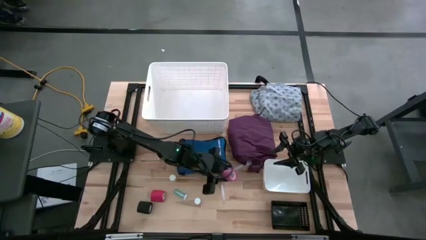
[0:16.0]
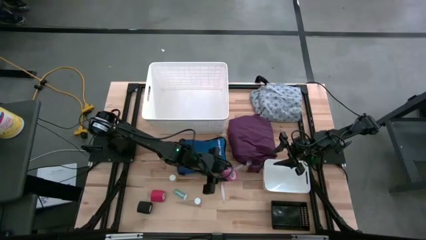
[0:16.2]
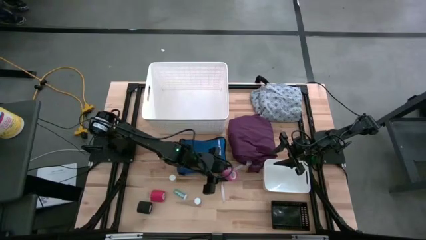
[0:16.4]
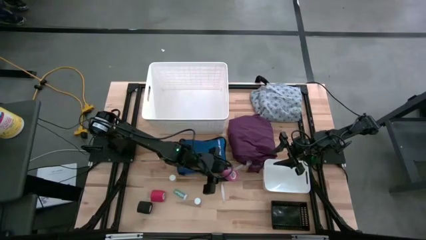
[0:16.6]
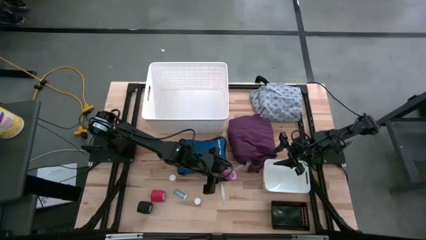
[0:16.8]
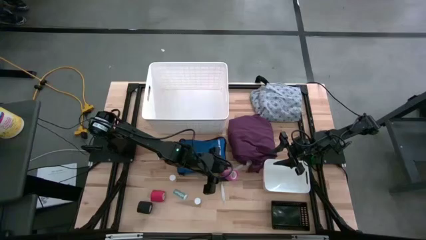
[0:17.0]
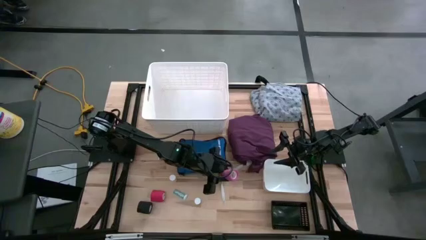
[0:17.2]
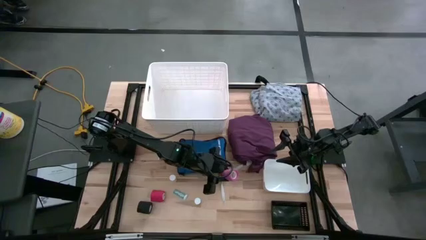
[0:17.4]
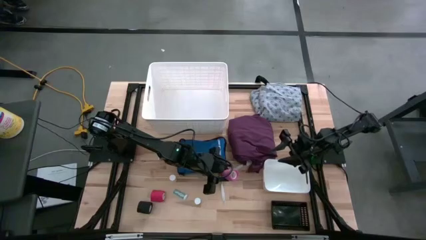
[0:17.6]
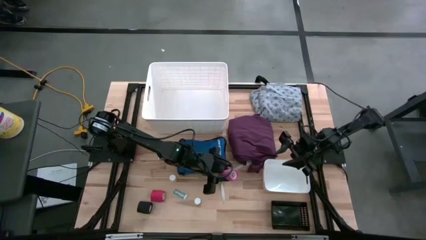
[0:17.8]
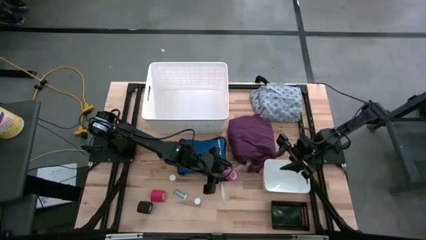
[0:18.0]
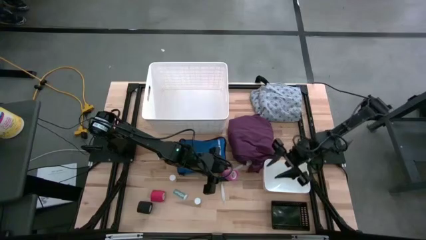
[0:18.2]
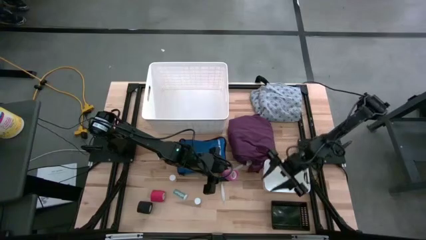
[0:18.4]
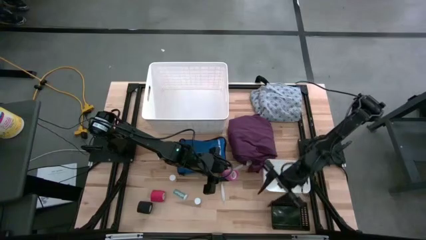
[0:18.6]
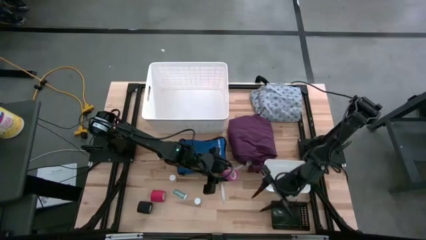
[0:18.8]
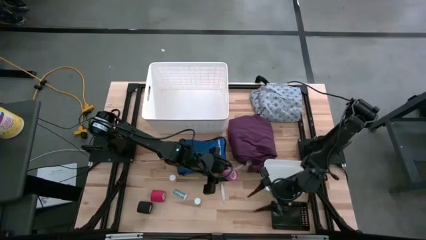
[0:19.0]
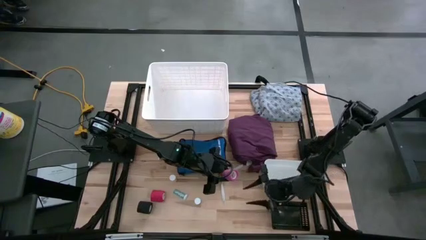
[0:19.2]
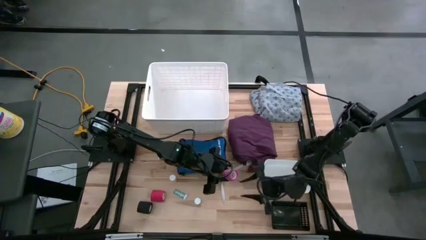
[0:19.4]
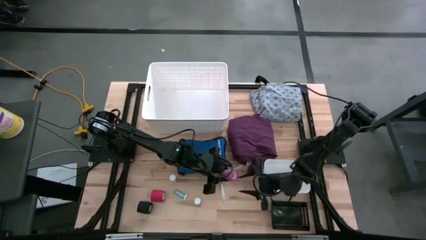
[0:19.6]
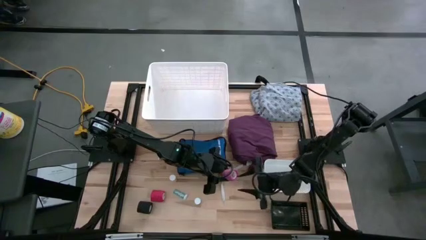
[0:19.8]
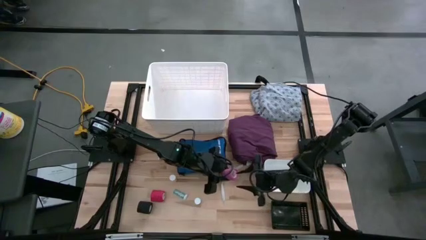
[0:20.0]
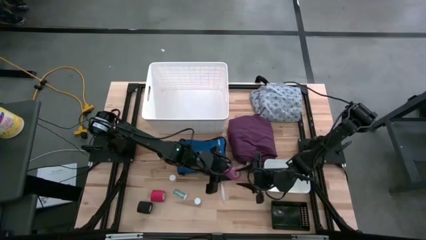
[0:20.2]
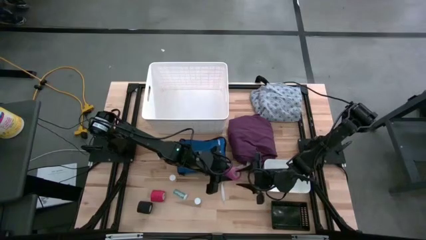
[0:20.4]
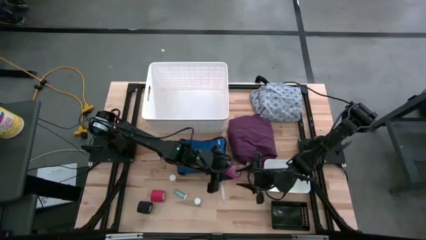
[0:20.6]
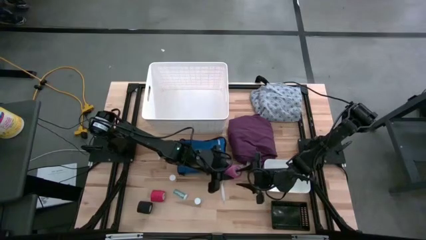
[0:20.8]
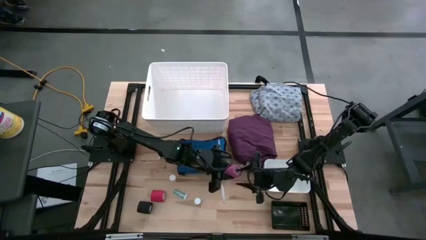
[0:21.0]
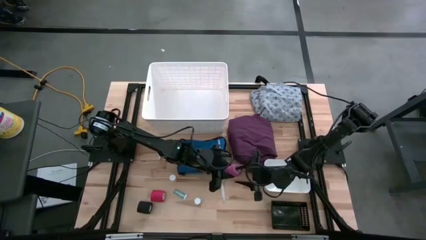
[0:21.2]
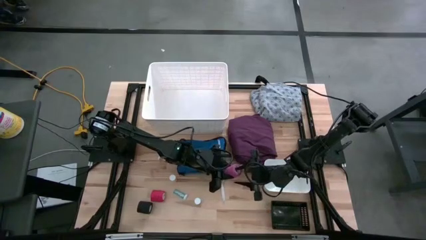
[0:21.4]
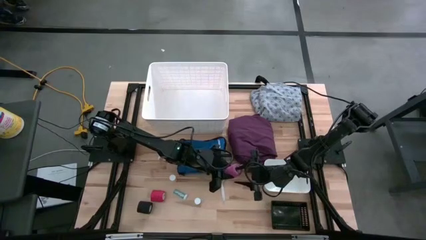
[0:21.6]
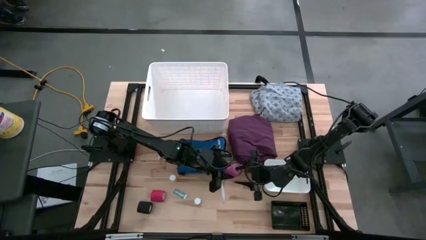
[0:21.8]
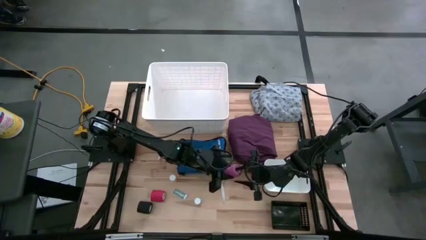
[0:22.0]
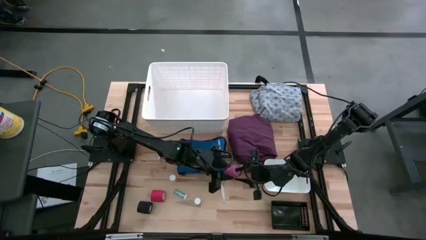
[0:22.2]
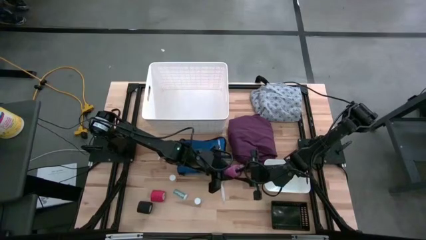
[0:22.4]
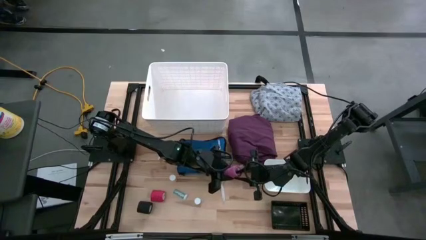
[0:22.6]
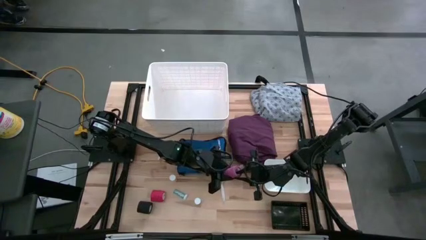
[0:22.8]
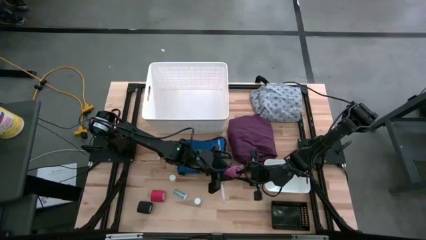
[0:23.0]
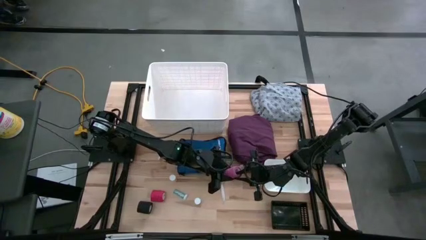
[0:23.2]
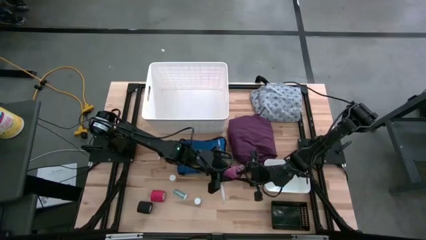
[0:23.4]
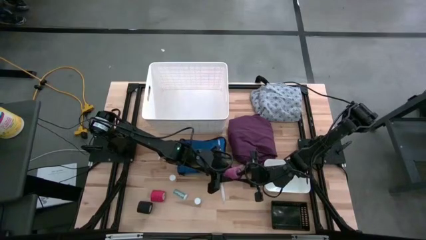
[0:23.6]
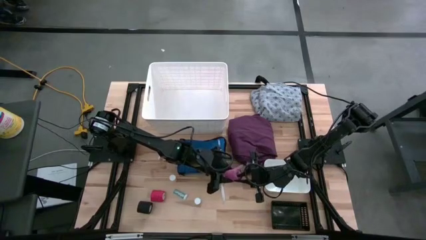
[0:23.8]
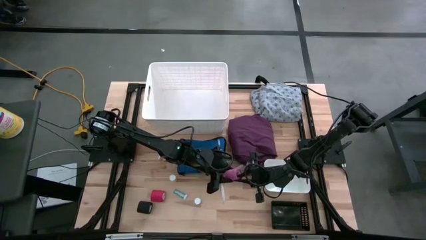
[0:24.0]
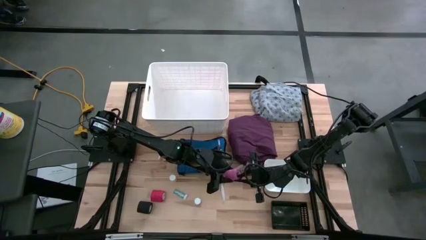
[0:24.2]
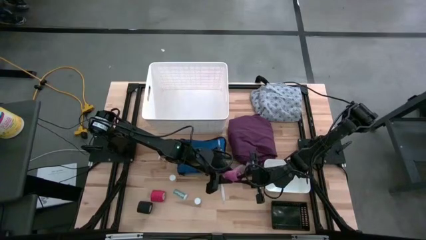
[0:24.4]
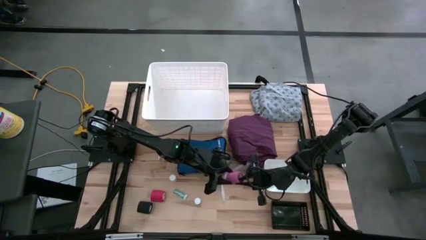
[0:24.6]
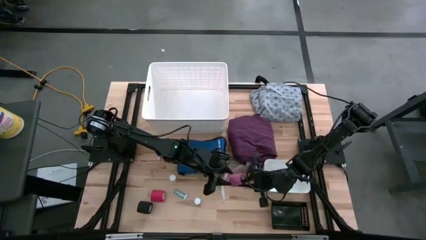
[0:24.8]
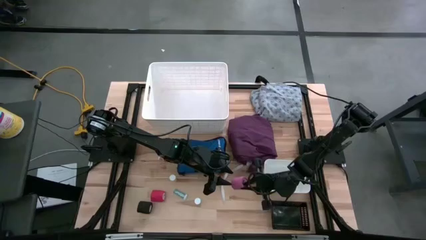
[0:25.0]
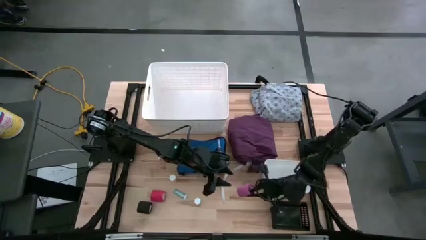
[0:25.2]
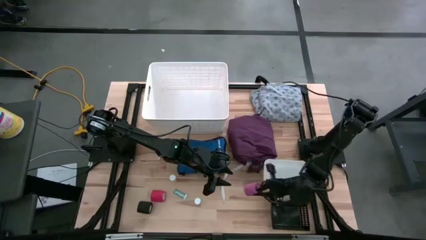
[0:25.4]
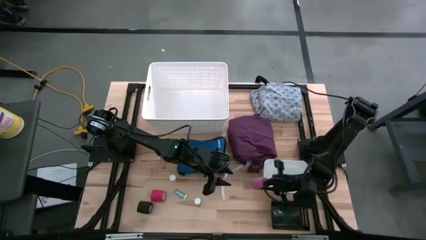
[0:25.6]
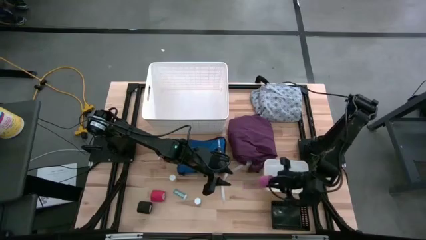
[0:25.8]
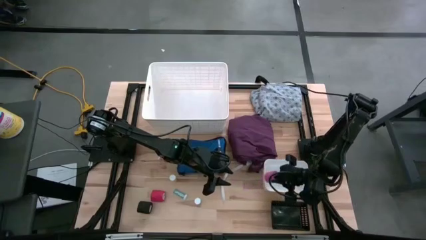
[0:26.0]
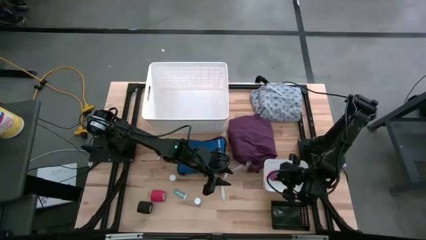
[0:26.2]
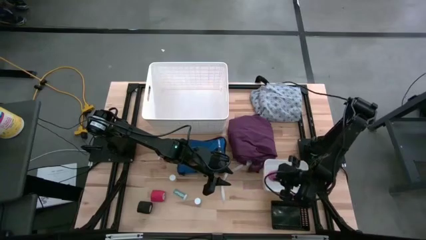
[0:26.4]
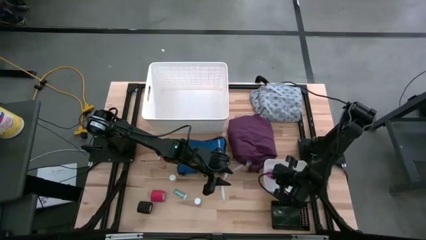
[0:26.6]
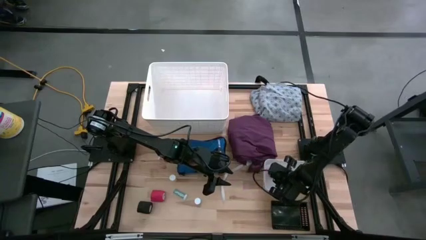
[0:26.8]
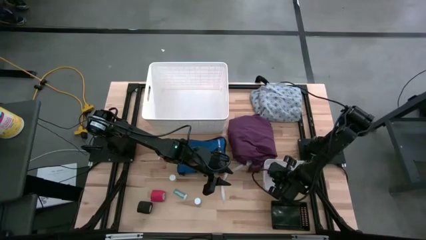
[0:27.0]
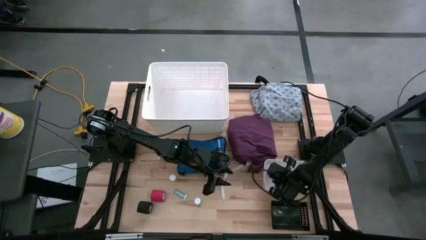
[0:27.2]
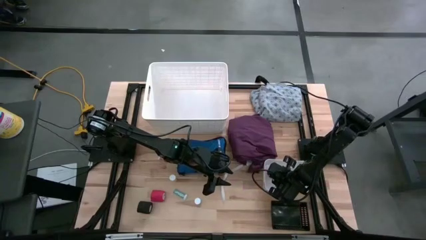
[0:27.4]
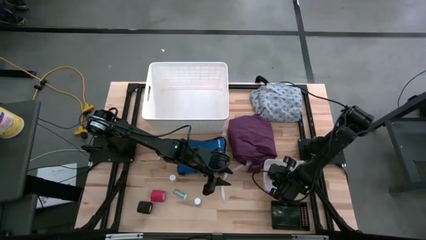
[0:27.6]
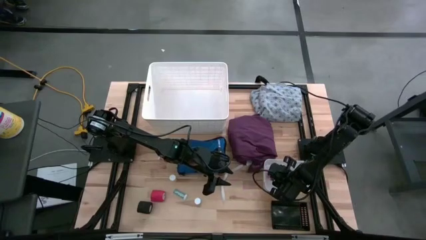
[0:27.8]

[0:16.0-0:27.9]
Task: Pick & Place Medicine items
Put the pink bandage into the white bin
